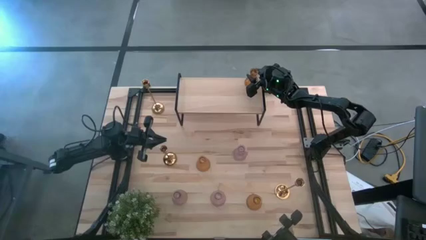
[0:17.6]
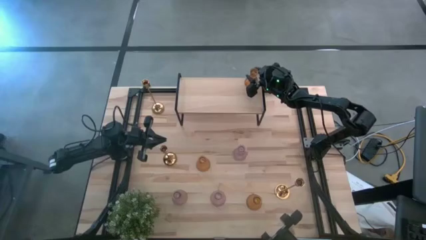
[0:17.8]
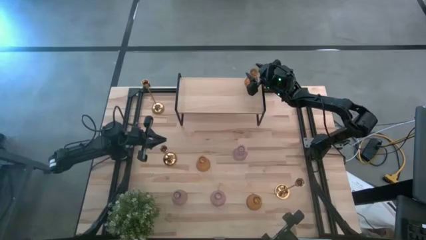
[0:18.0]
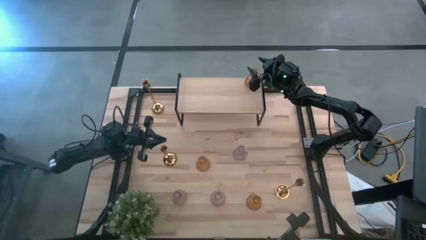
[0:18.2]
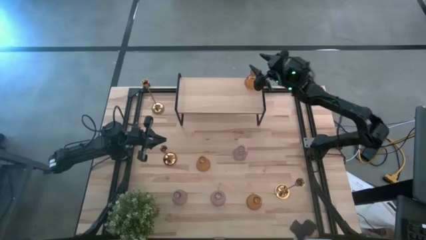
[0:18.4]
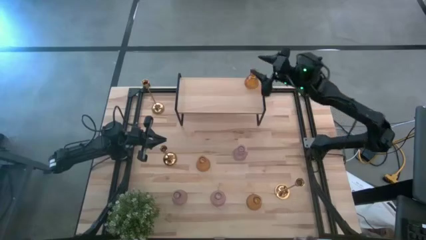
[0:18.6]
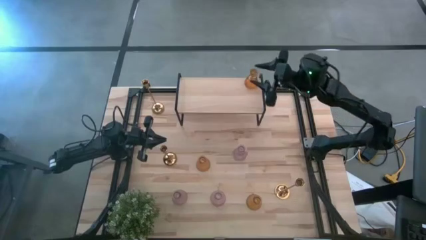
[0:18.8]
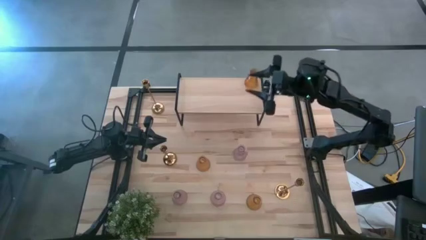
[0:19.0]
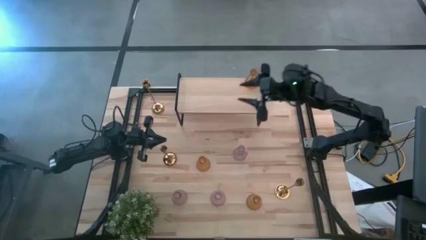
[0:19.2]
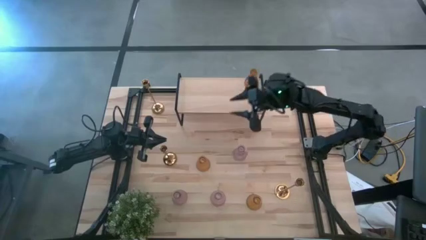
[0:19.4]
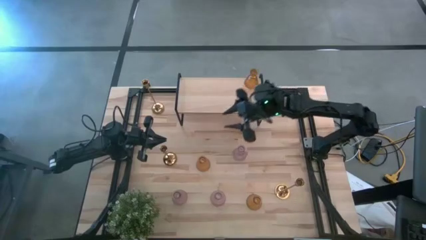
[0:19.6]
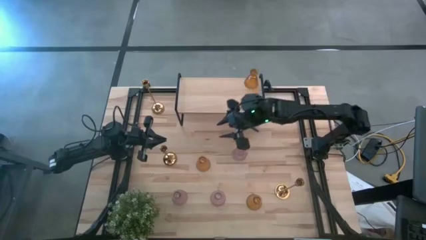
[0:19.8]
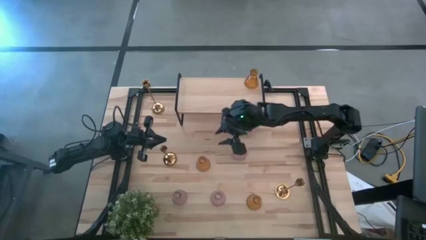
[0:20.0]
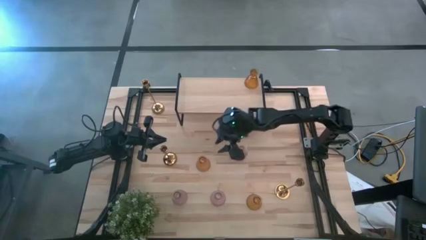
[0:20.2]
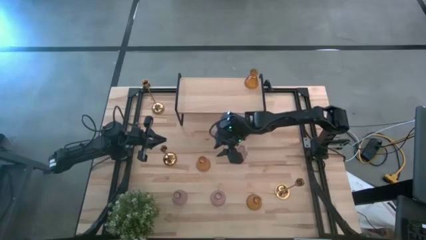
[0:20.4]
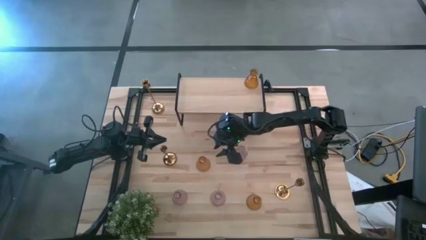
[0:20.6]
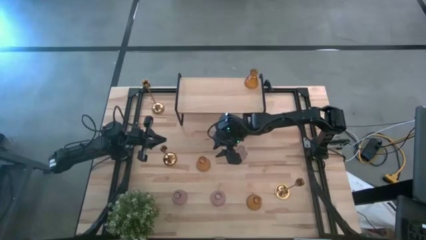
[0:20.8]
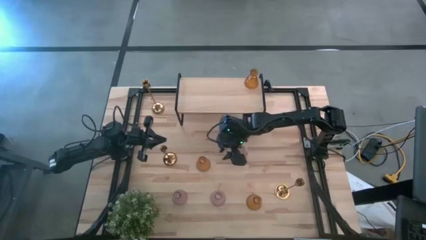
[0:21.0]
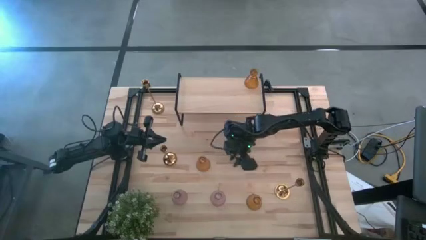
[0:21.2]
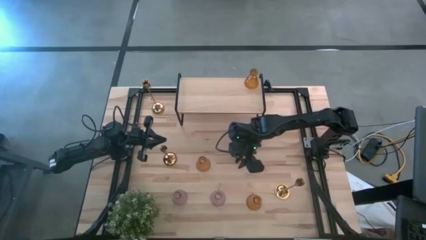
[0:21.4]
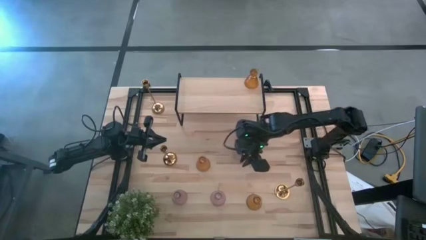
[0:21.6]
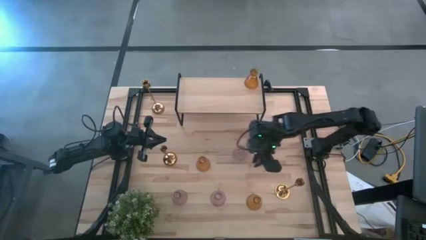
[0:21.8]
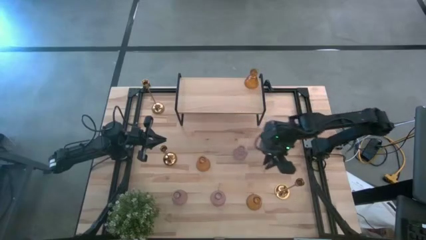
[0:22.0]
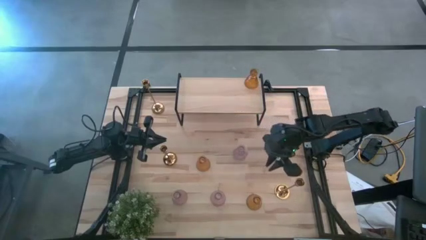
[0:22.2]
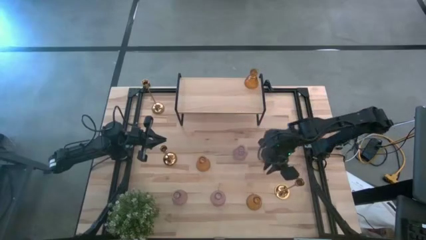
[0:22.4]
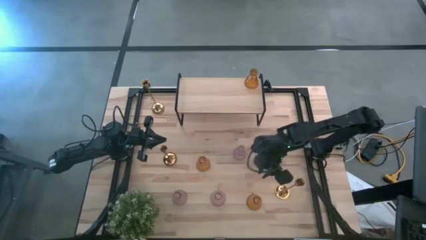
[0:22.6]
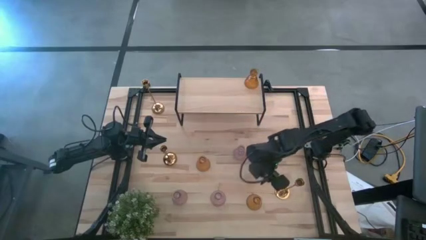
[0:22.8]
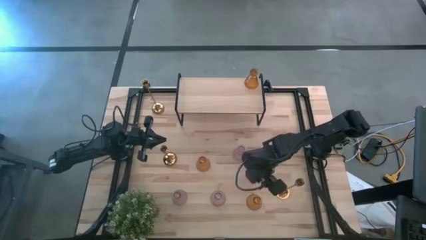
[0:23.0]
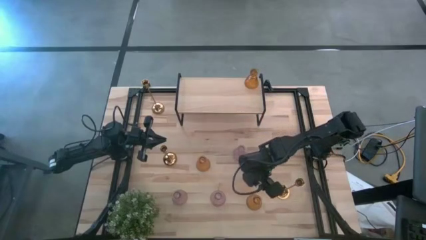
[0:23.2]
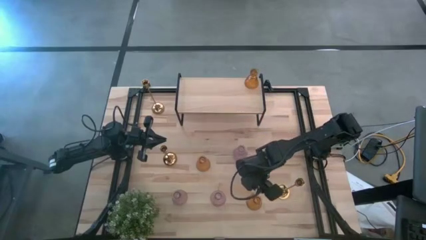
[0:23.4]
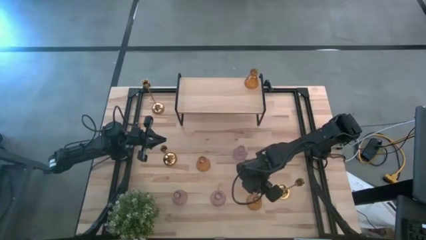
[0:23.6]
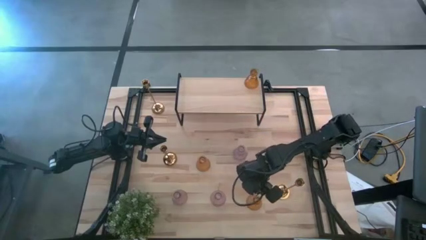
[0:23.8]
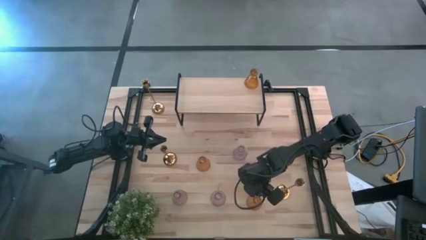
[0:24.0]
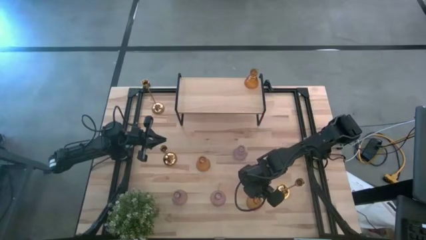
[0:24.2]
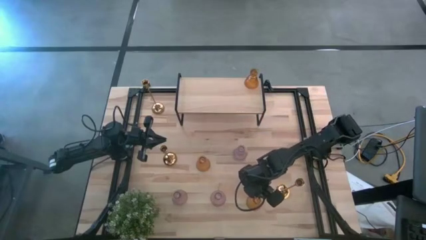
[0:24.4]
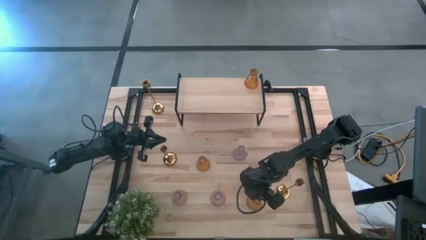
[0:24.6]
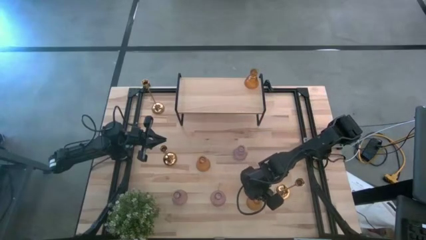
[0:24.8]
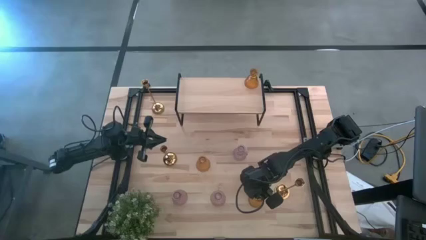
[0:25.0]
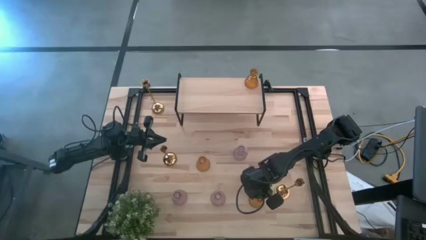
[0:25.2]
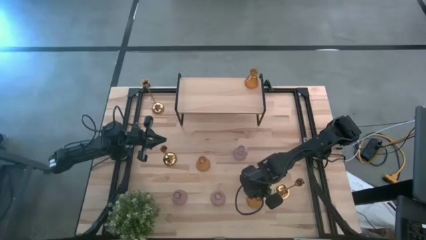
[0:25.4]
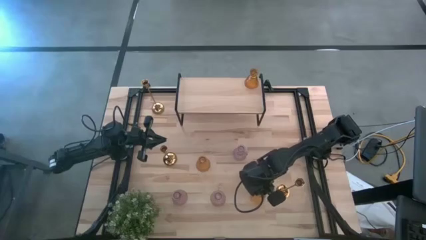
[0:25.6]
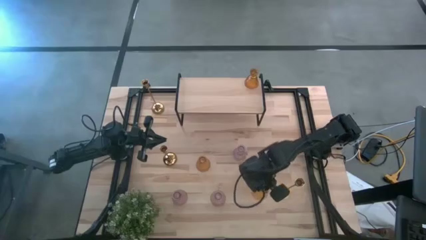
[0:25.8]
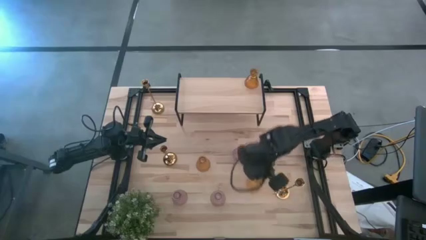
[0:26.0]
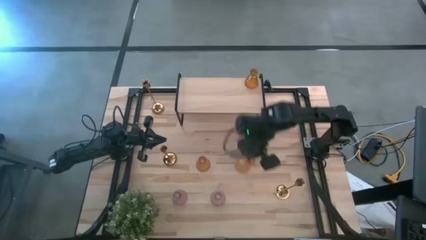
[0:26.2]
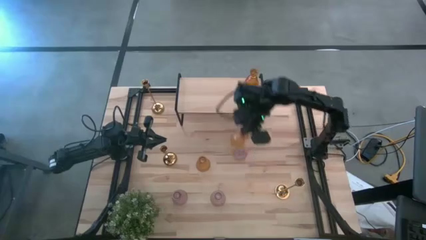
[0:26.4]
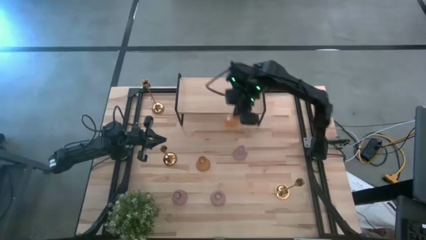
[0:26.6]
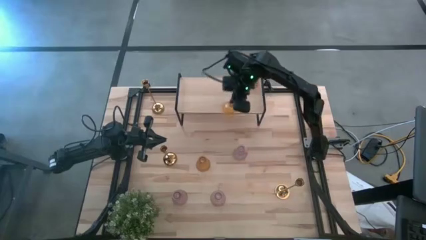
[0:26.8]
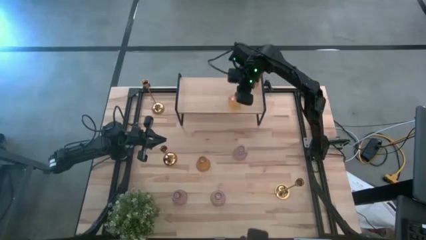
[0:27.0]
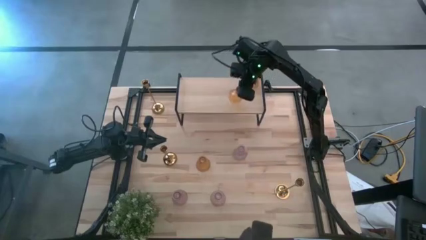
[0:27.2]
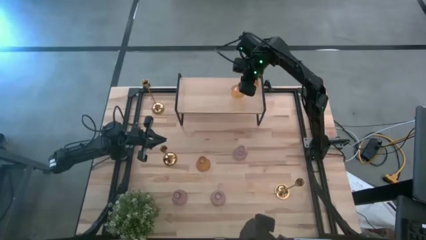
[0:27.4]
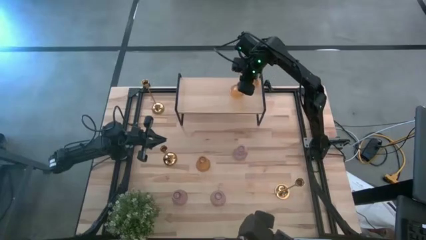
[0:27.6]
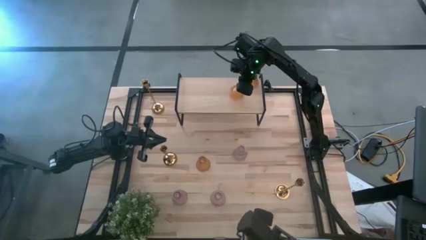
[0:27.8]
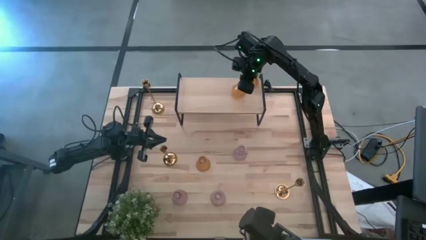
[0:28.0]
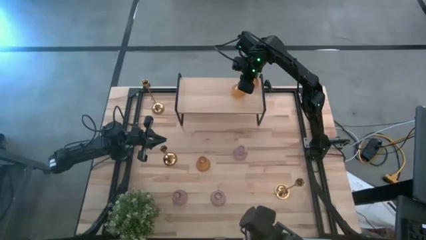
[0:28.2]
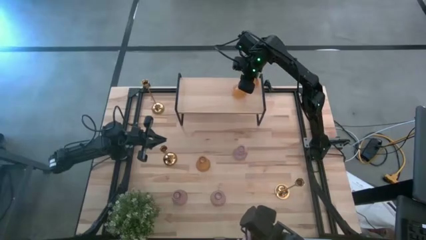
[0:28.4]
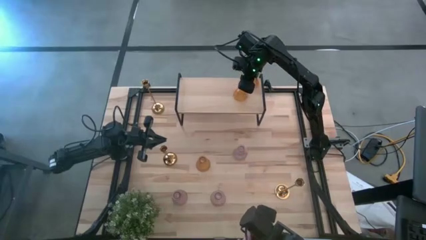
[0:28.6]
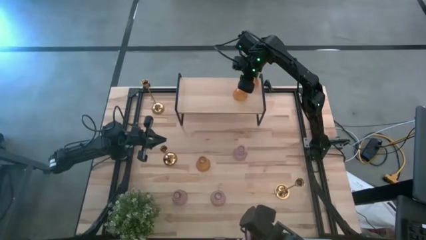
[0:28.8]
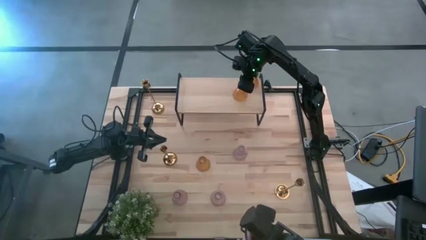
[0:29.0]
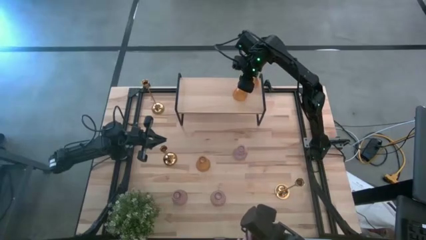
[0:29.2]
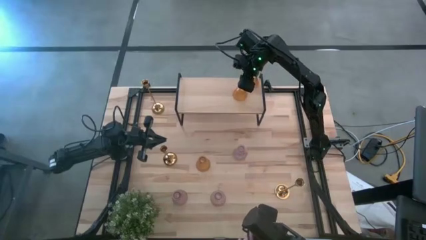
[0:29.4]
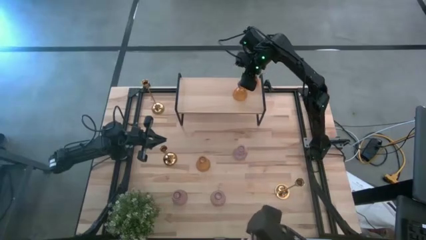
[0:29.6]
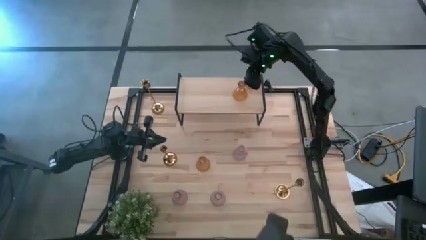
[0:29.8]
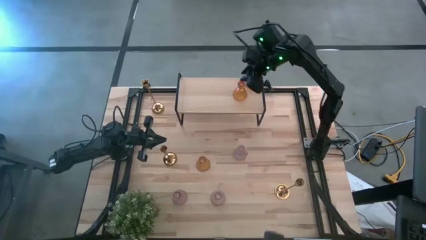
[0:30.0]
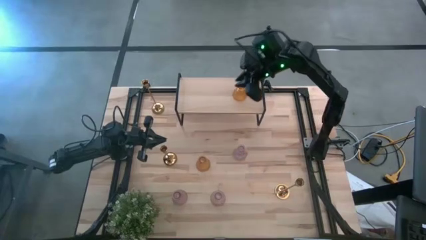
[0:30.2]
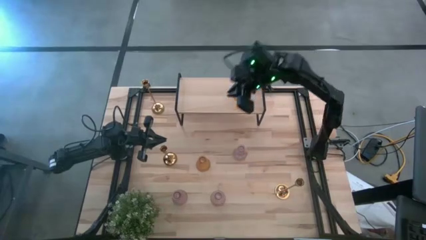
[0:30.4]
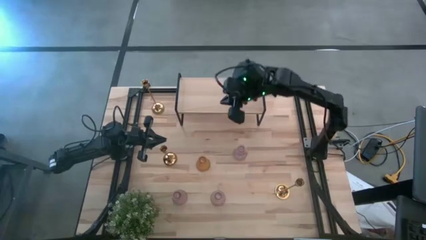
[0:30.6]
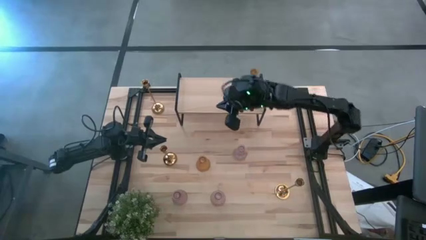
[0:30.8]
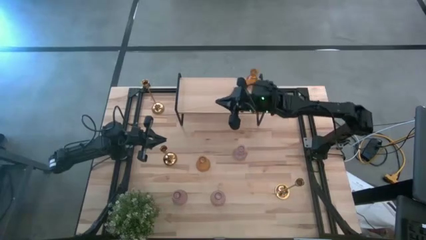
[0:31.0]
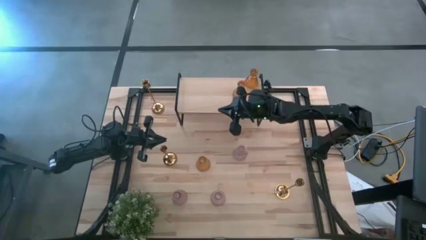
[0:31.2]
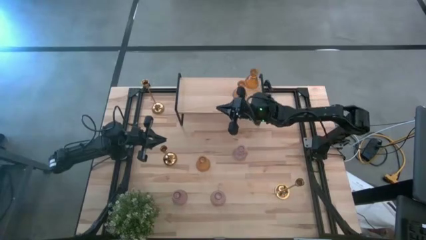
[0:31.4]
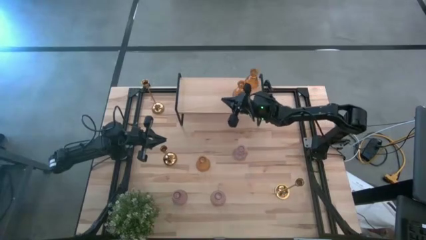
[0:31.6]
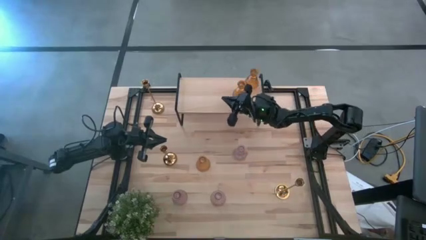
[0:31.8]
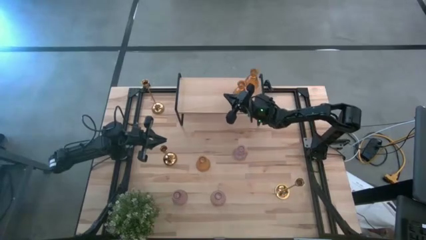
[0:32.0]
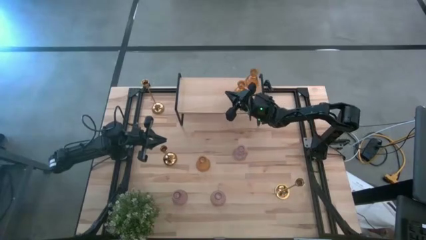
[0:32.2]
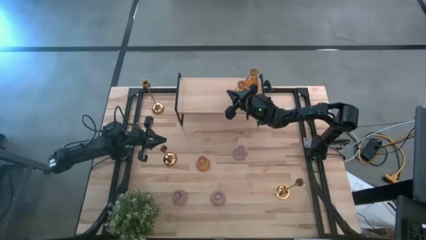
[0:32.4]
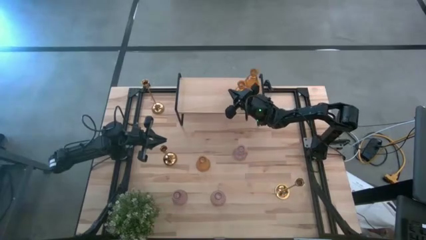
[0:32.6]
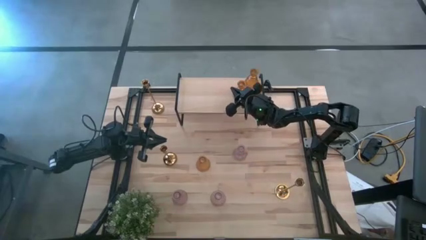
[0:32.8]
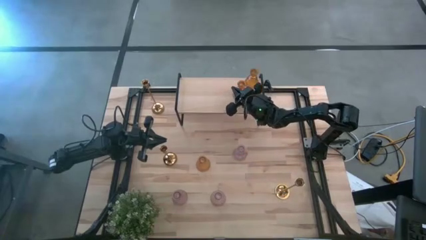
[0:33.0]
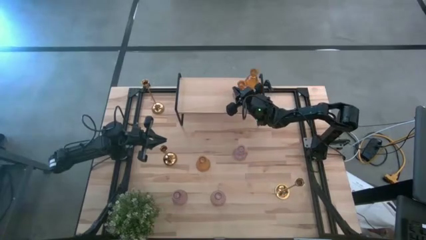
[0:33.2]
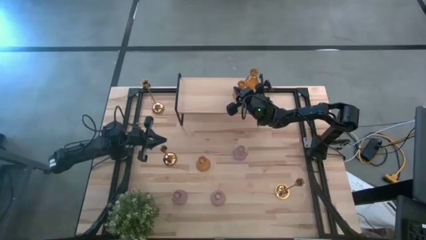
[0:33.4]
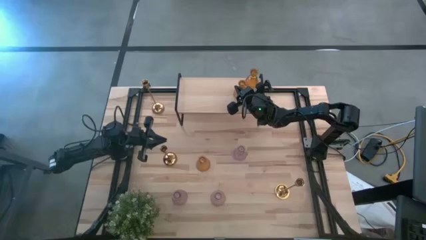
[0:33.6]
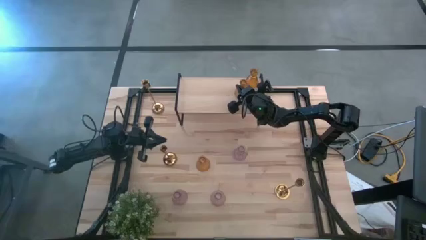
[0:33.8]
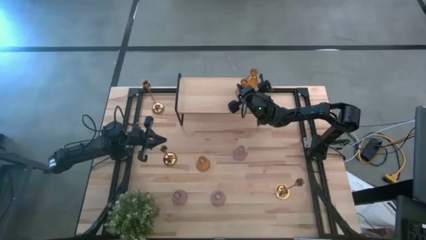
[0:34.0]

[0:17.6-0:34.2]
Task: Pick & Place candle stick holders
Put the bottom yellow glass candle holder on the shelf
